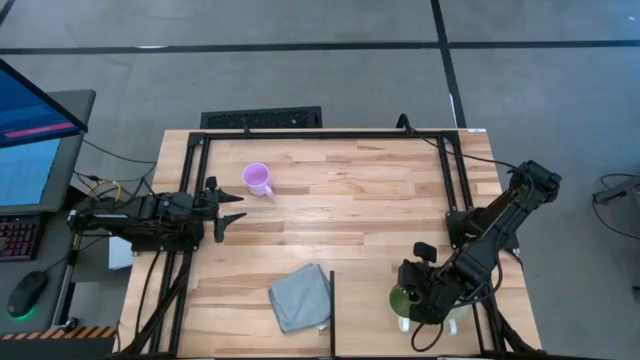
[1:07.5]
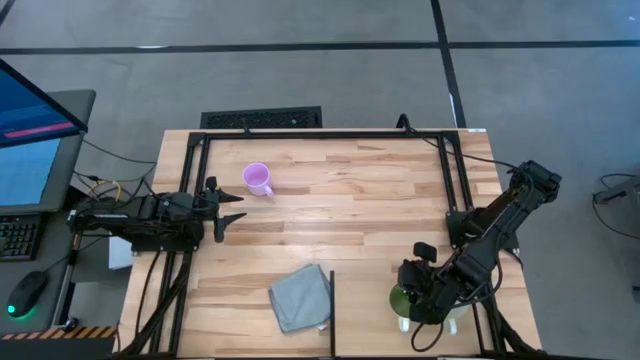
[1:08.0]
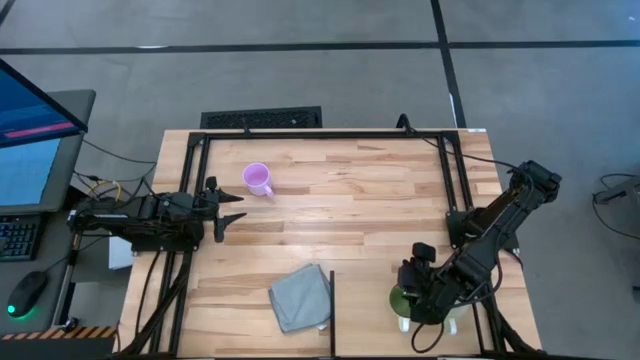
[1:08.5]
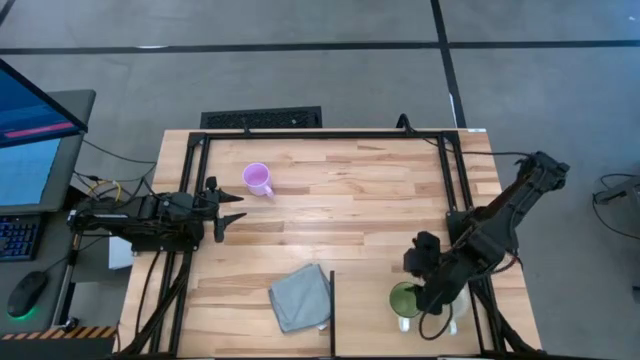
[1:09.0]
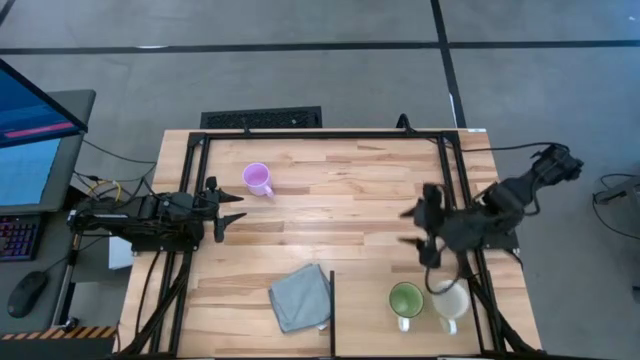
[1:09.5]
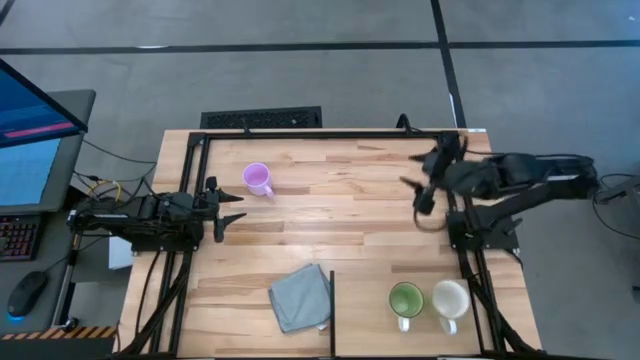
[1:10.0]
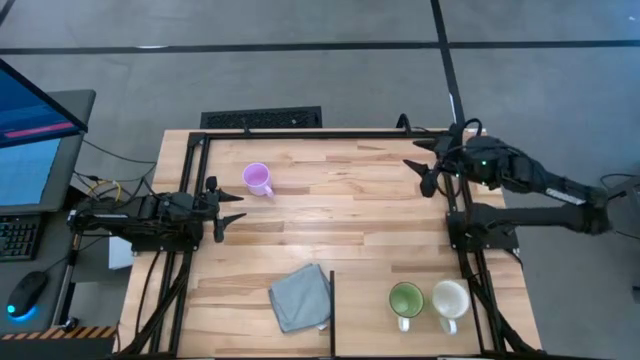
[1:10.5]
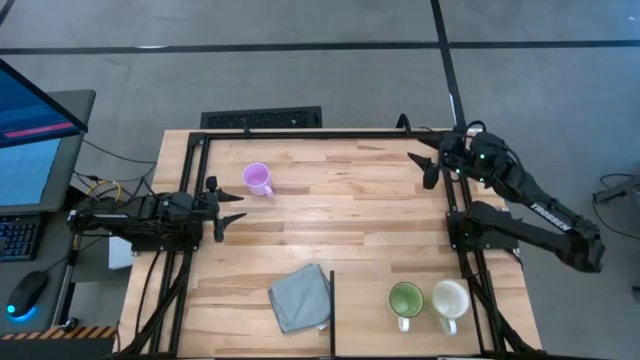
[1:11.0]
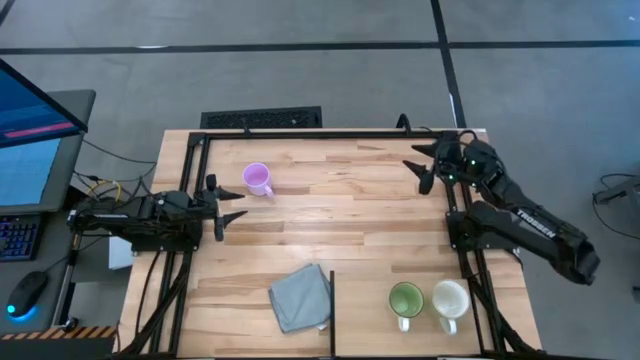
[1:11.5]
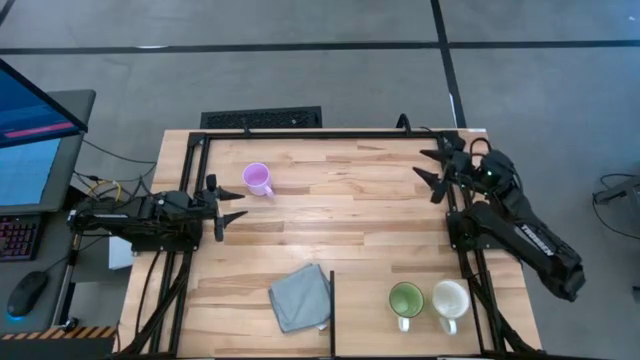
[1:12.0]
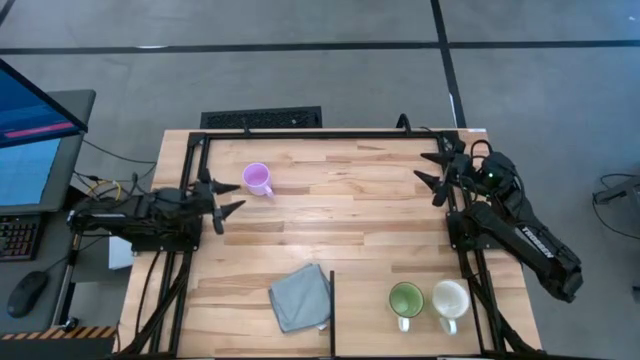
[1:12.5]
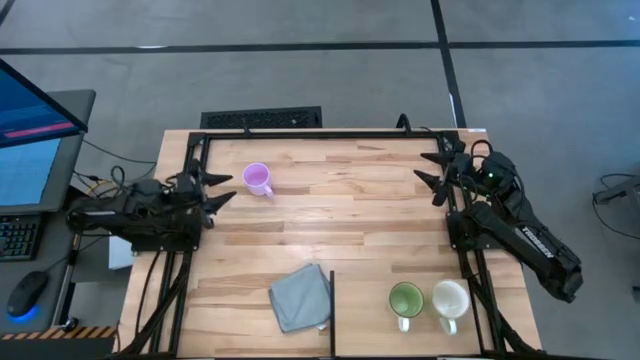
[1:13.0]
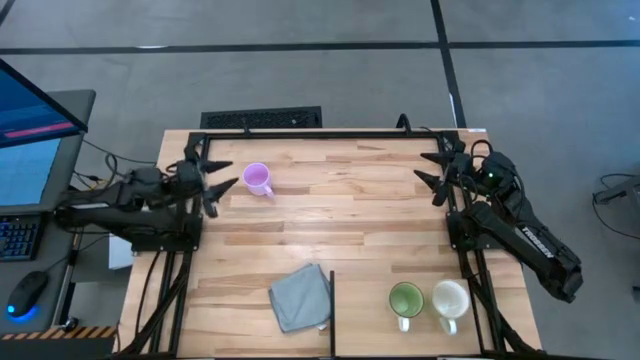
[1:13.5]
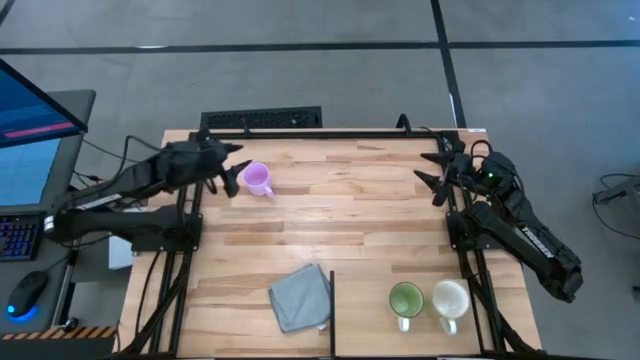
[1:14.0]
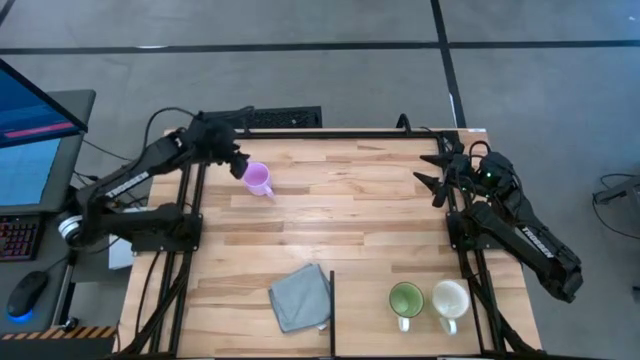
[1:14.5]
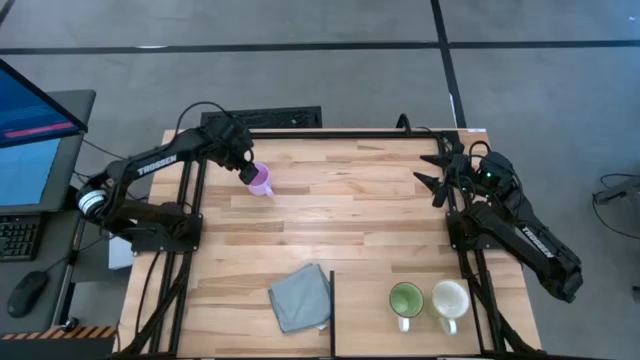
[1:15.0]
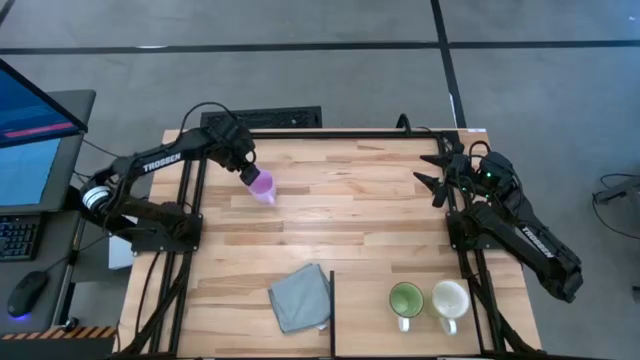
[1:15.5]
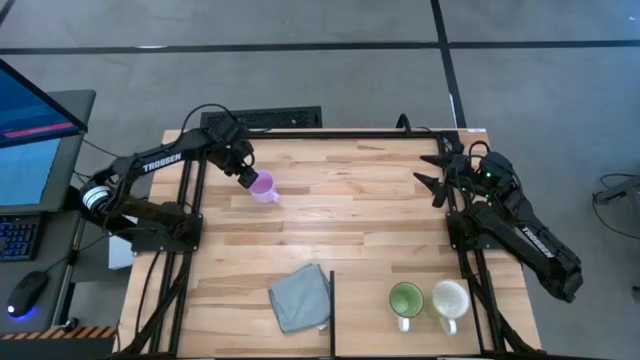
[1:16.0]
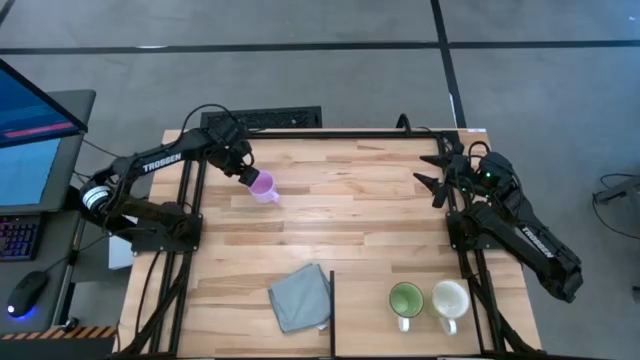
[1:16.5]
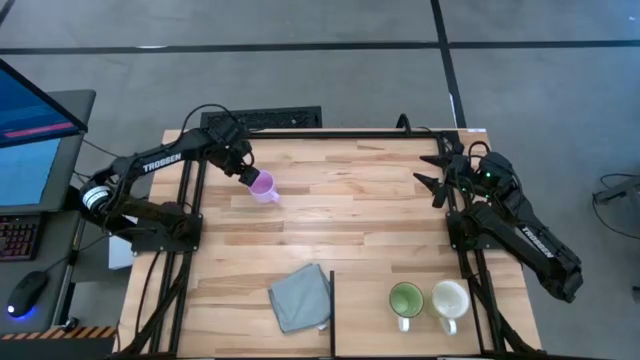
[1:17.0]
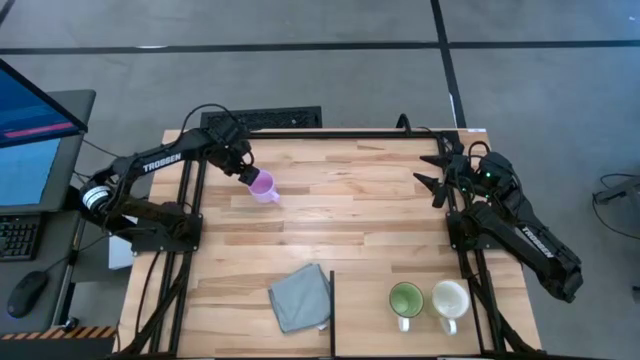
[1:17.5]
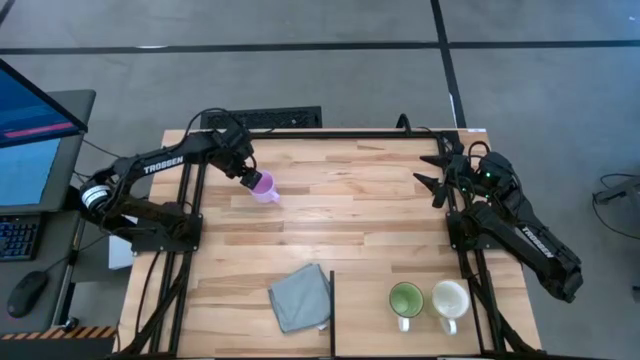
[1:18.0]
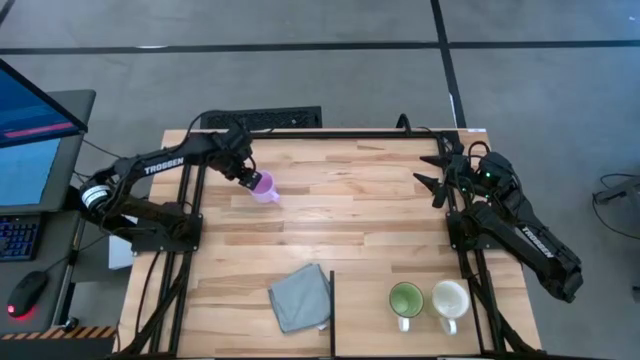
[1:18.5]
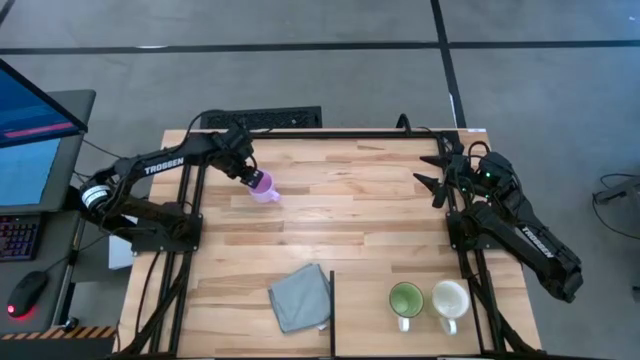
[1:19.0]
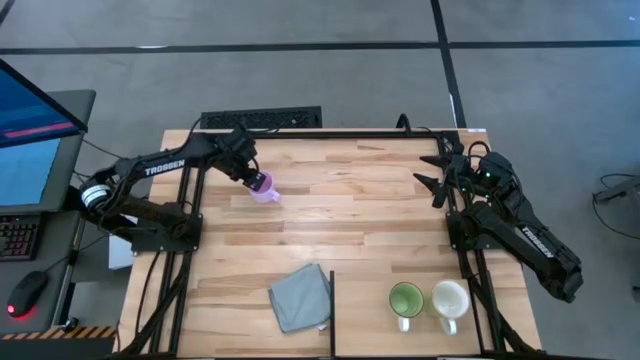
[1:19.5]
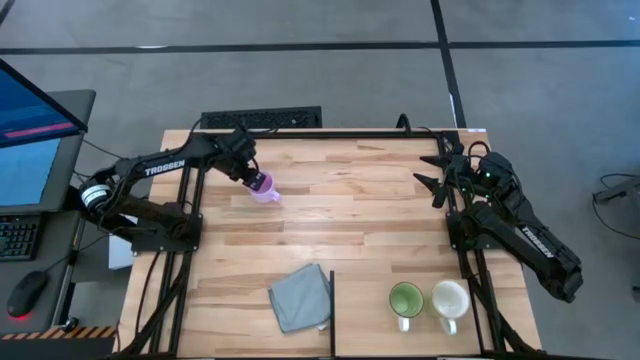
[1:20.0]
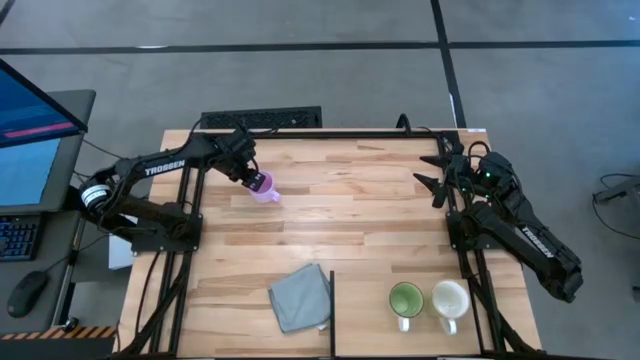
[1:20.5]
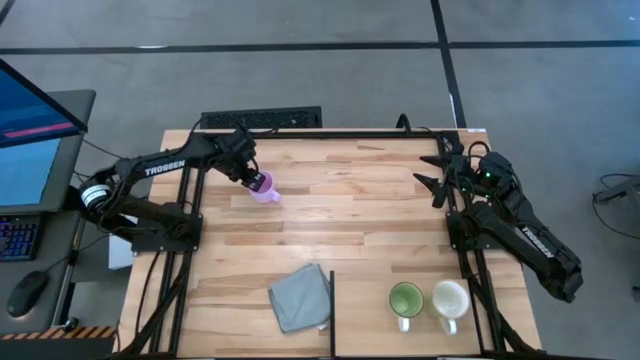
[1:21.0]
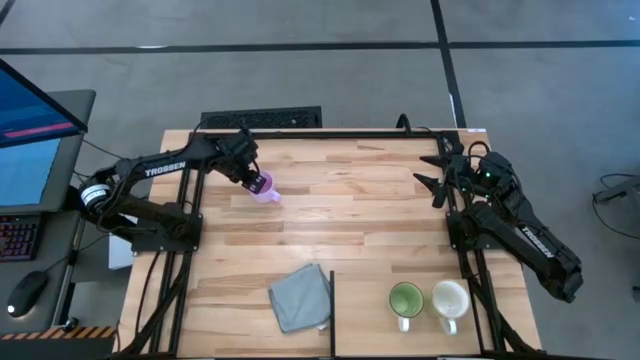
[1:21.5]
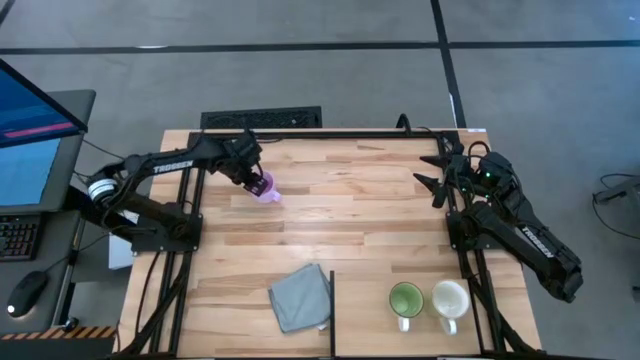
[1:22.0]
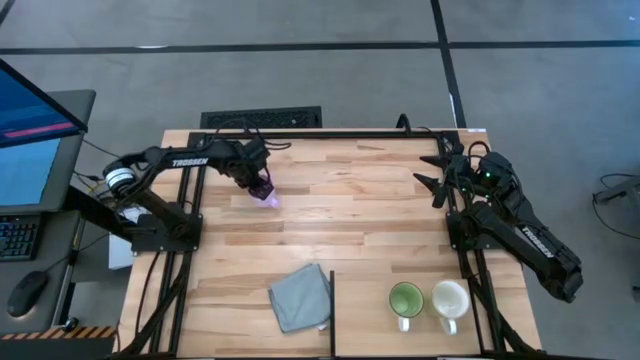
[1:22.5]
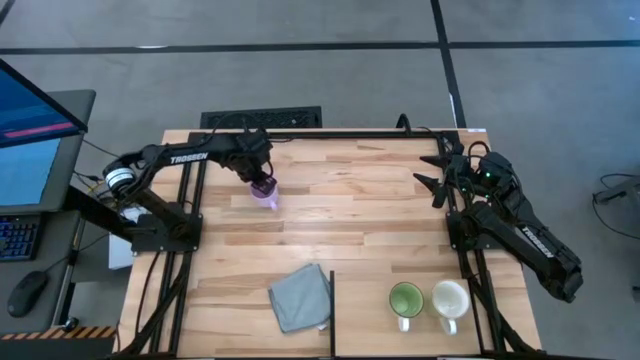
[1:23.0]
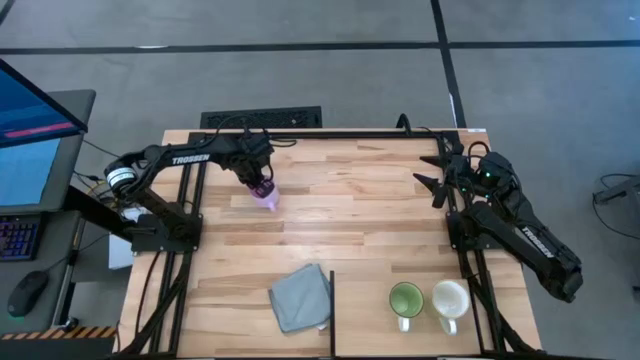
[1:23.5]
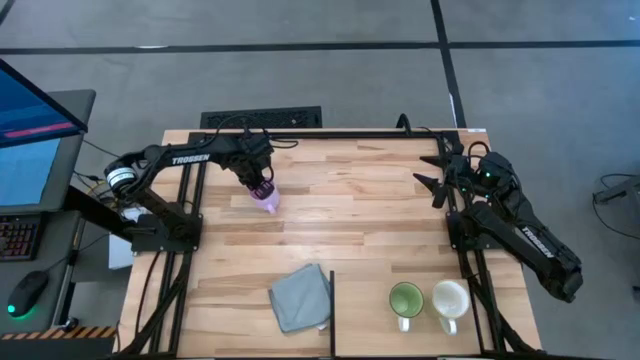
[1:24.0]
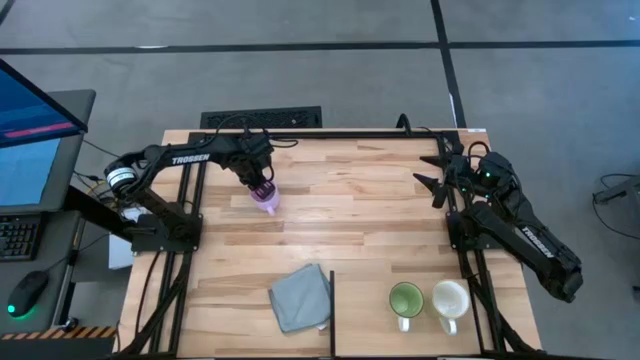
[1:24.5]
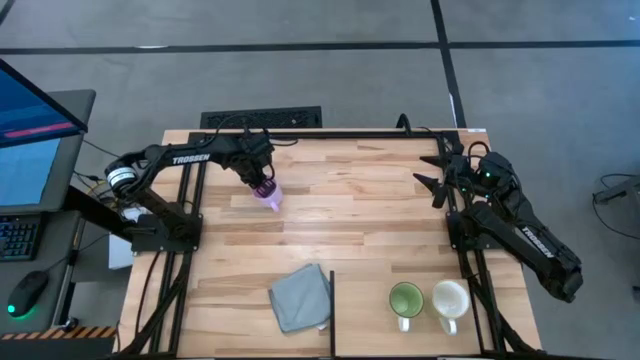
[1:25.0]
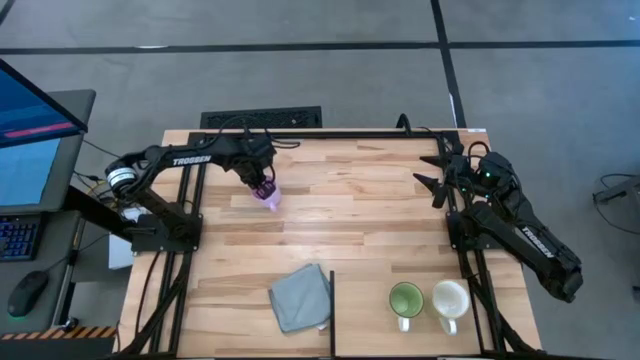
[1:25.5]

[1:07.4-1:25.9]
Task: Stack small to large cups/mugs on shelf
Put the pink mug on the shelf

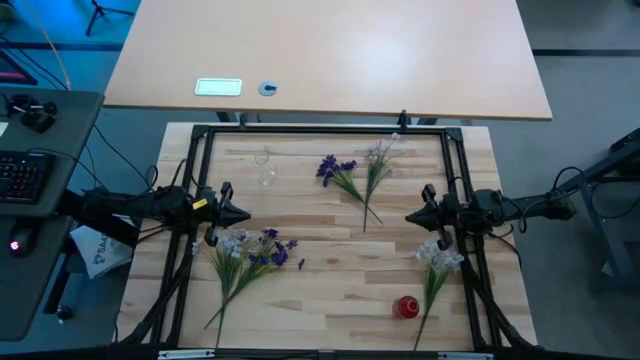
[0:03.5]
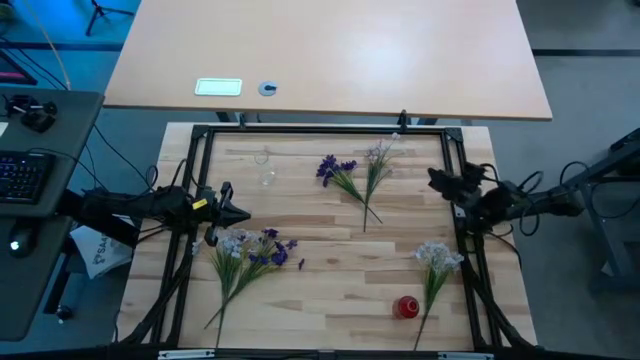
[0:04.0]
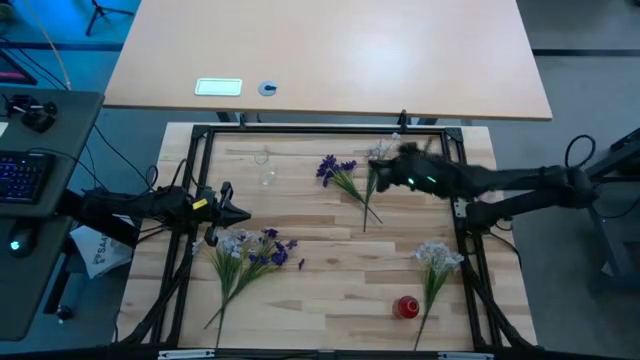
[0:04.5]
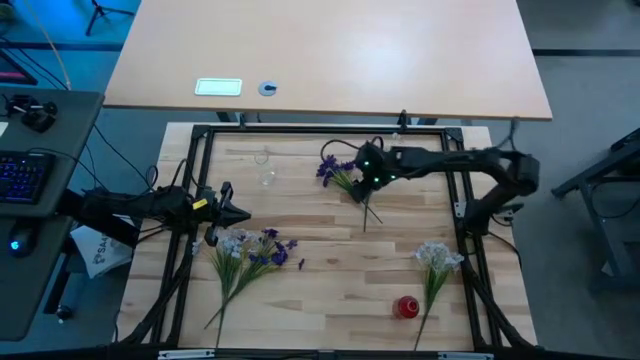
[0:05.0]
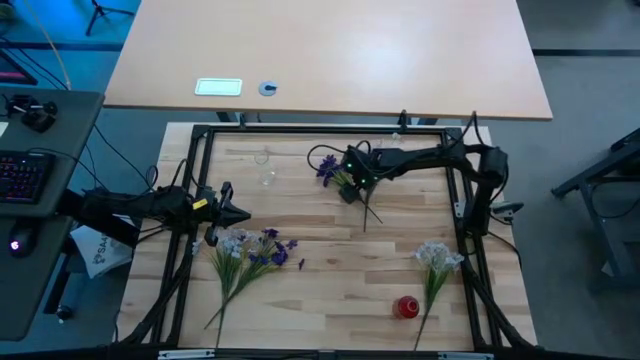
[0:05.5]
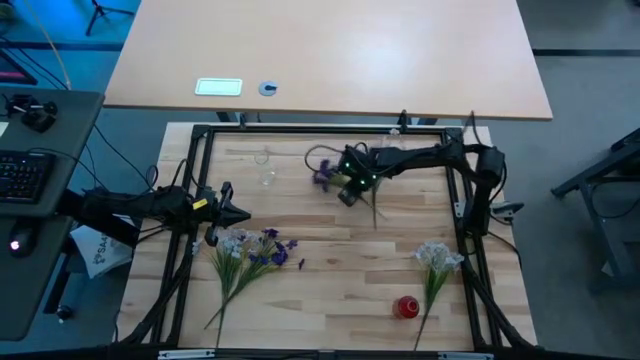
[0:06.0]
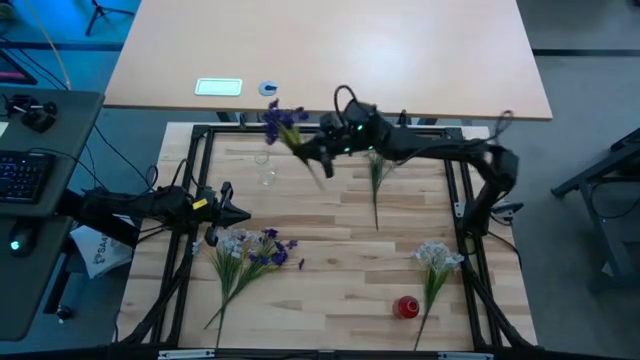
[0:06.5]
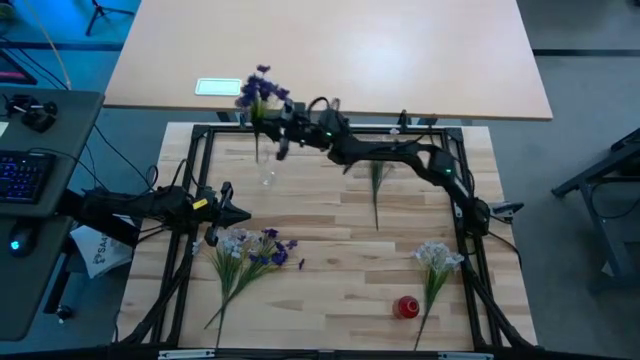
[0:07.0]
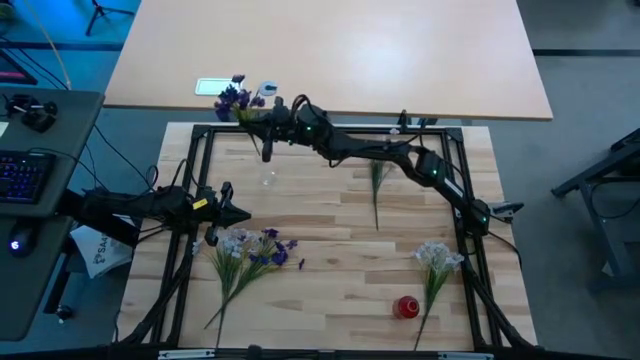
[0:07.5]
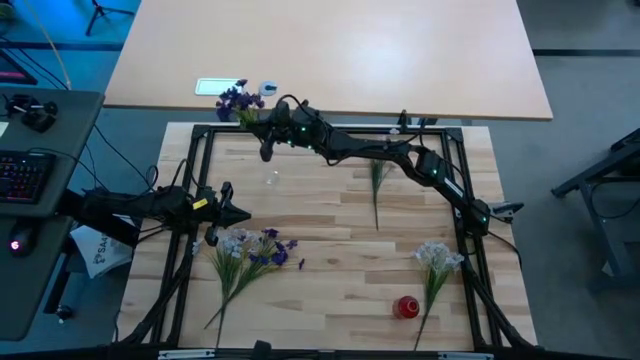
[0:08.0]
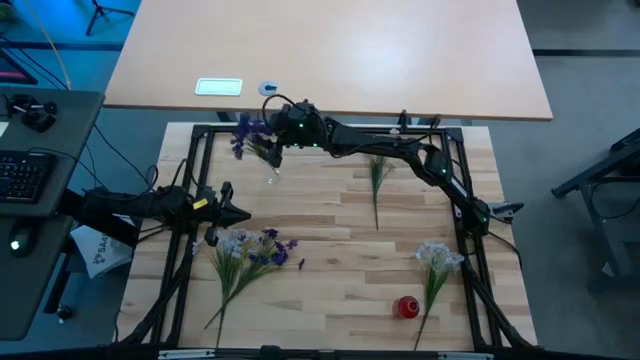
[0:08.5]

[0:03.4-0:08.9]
Task: Sort flowers into vase by color
Put the top purple flowers into the white vase
